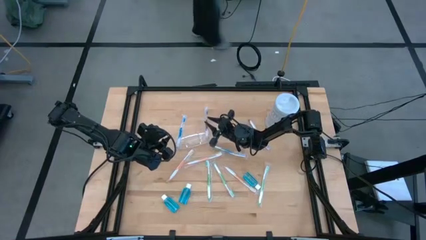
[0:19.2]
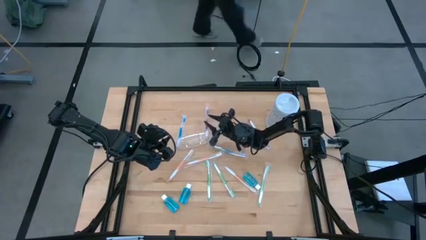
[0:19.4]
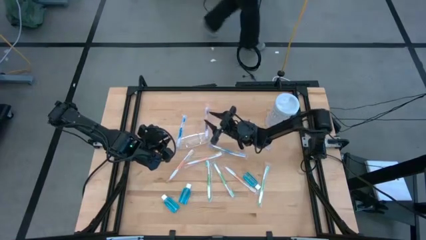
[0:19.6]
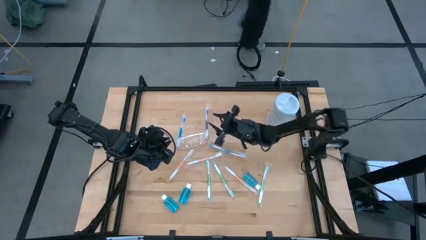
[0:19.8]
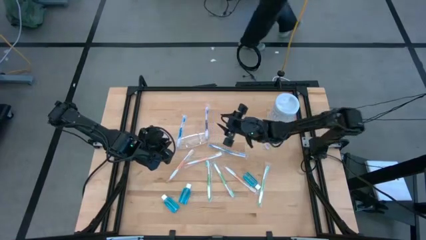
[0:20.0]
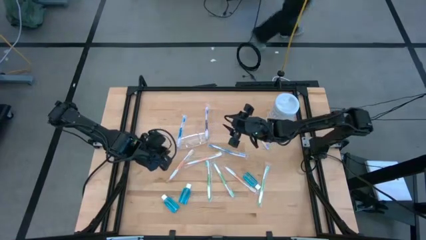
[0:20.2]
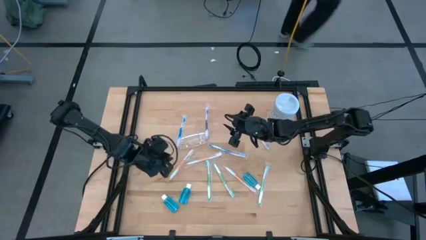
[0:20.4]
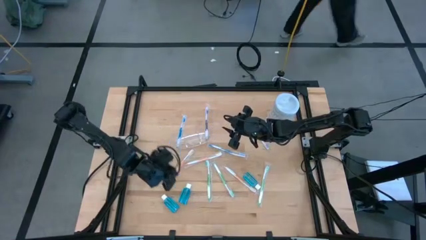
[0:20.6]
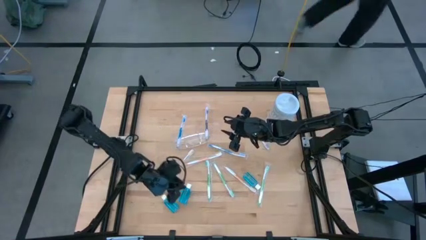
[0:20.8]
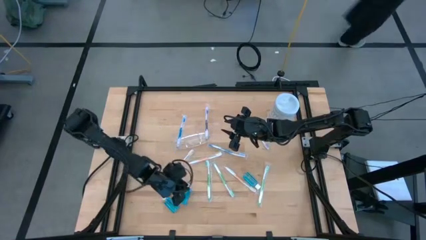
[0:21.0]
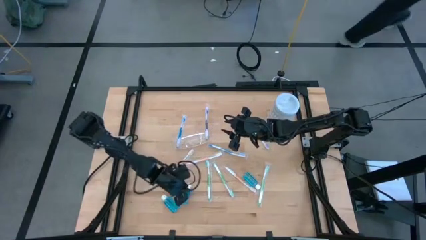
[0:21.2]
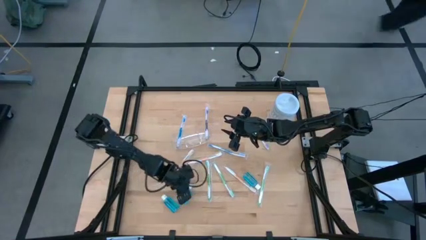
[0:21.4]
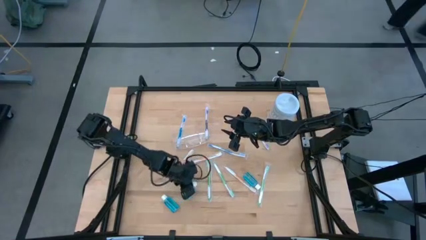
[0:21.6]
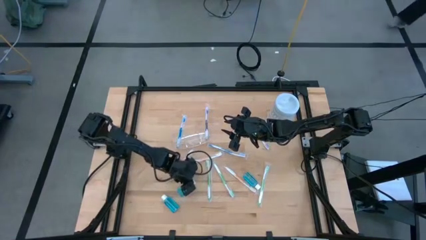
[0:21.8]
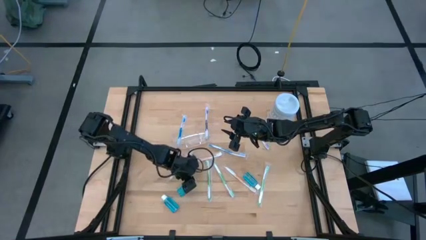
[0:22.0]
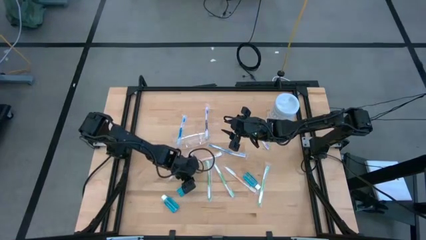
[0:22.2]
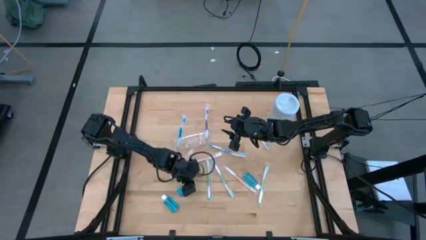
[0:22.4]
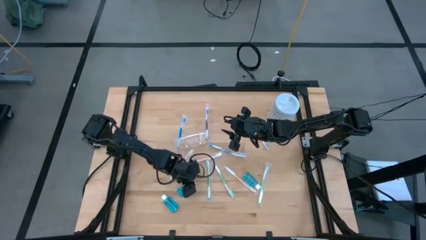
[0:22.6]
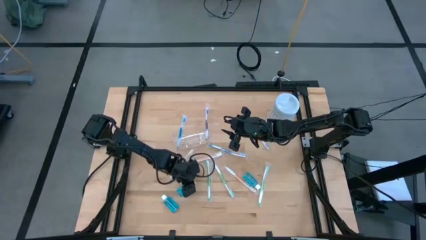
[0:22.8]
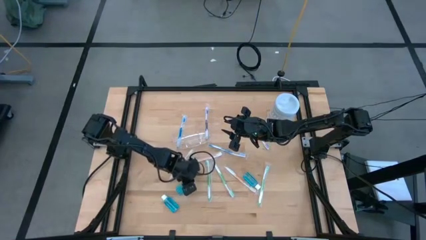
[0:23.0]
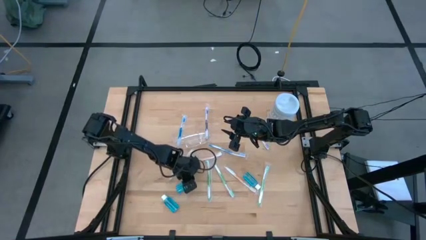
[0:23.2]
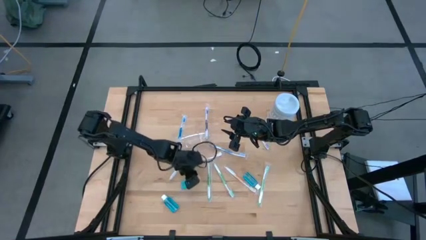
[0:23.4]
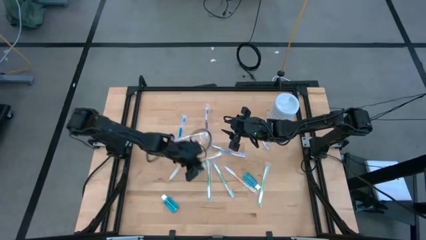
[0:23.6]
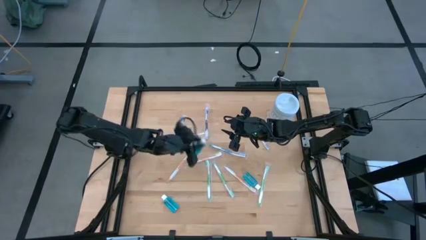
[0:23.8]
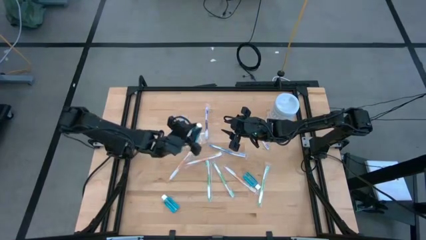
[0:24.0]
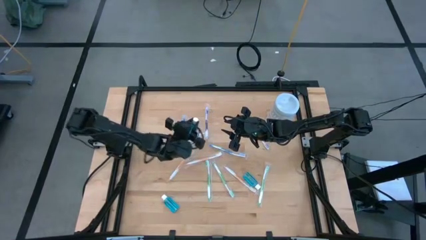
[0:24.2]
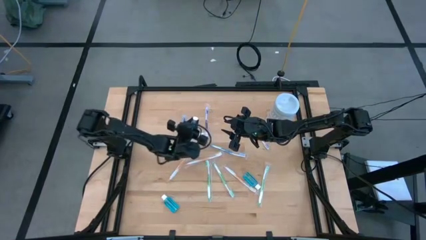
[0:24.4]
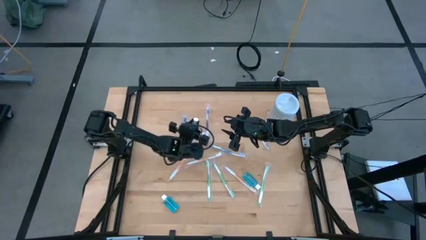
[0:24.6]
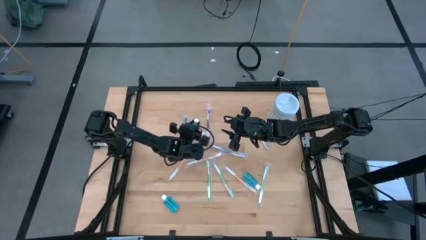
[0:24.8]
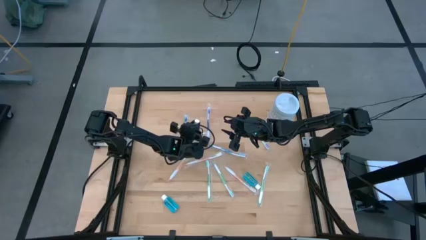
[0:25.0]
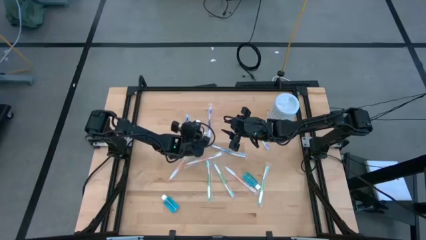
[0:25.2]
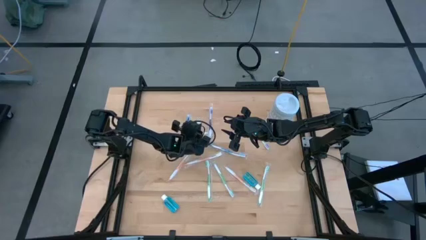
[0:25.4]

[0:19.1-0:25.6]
Task: Pick & Place toothbrushing station
Put the middle blue mouthwash into the transparent organizer

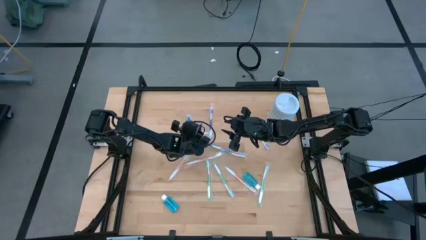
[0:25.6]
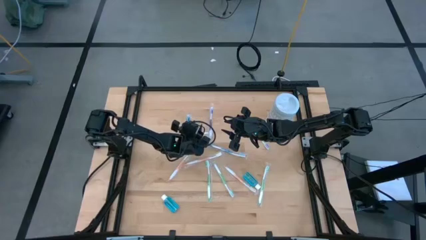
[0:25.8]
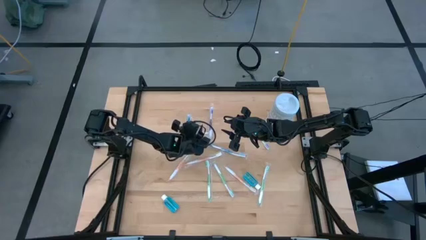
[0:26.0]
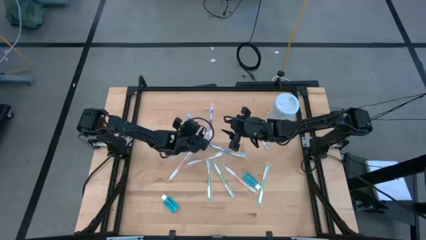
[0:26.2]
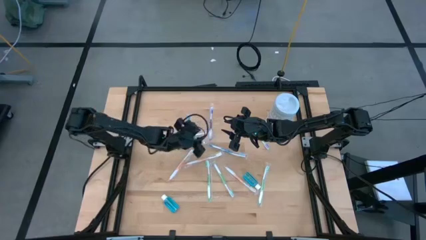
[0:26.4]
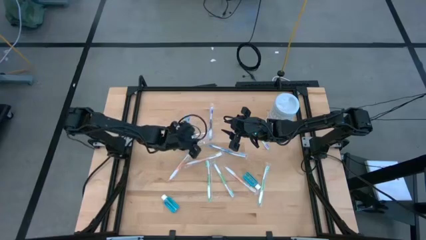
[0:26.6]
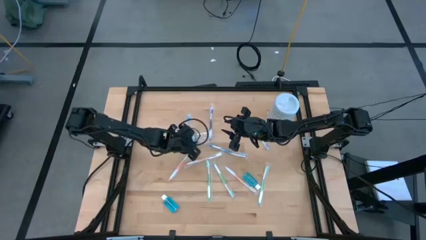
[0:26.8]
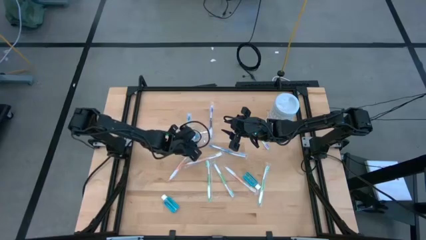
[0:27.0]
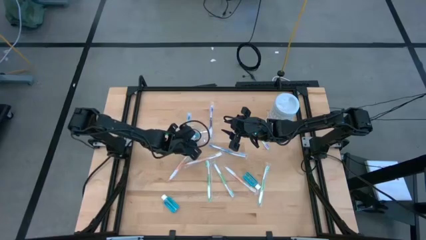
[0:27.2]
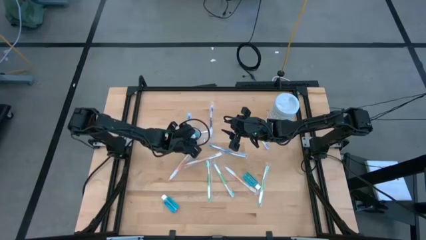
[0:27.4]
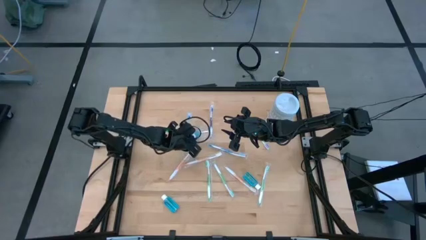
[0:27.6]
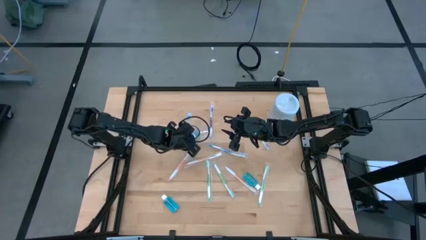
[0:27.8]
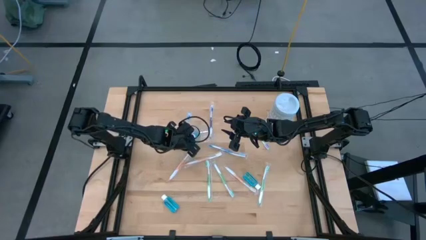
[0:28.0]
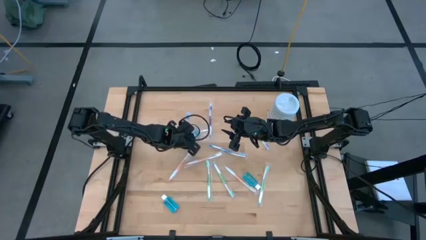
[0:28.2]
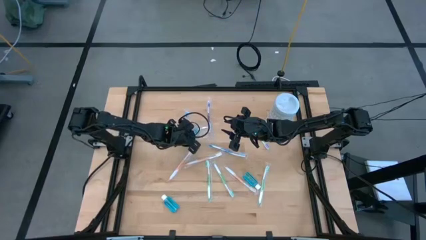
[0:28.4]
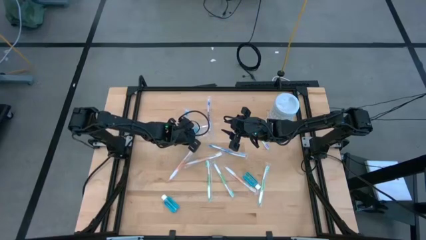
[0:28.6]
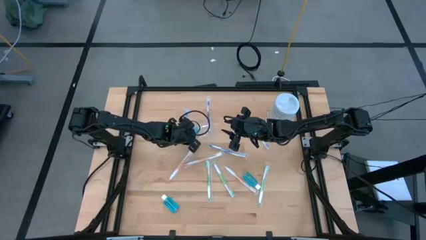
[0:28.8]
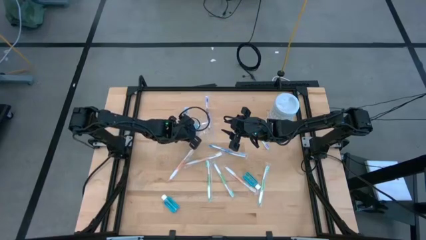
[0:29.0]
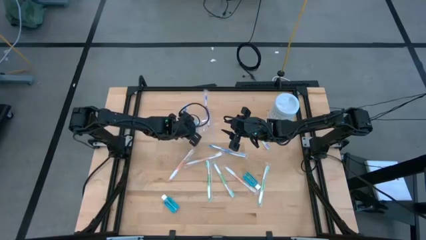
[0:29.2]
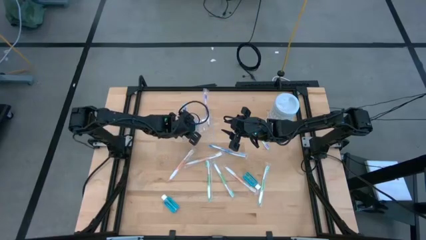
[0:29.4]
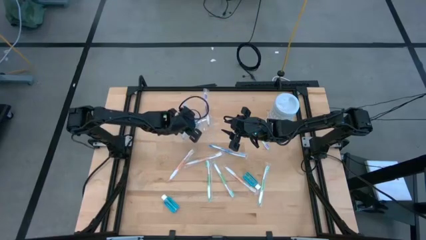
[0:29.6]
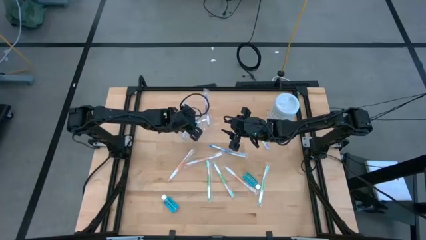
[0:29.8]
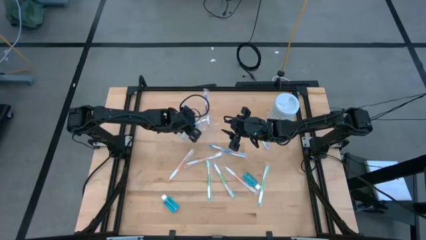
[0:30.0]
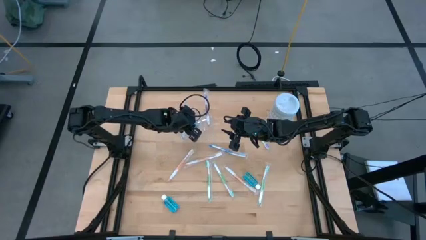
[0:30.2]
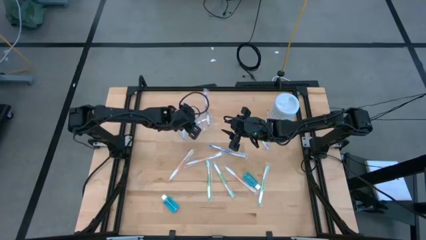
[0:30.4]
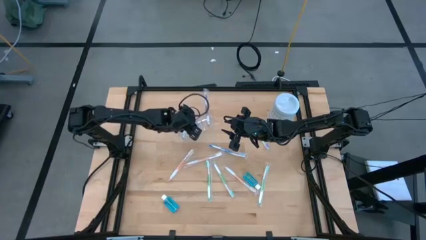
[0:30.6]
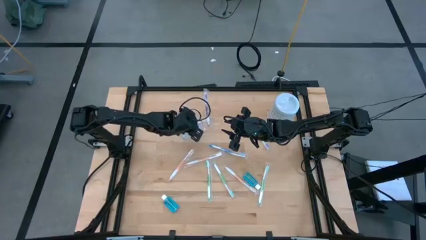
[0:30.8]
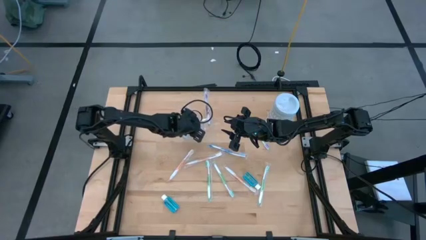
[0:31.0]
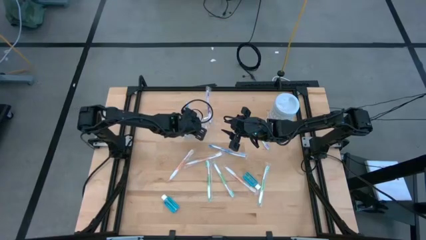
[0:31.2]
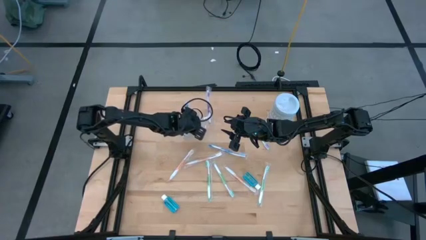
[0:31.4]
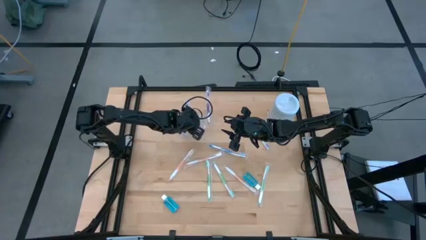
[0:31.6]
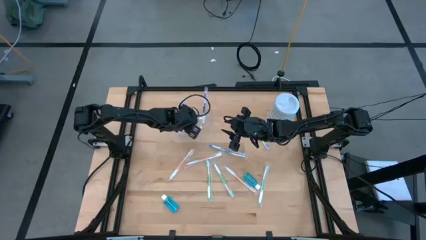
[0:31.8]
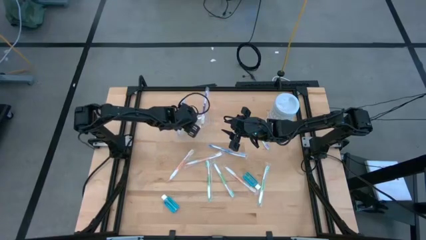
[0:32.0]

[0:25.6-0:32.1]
Adjust the blue mouthwash in the transparent organizer

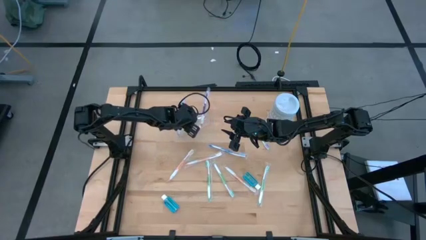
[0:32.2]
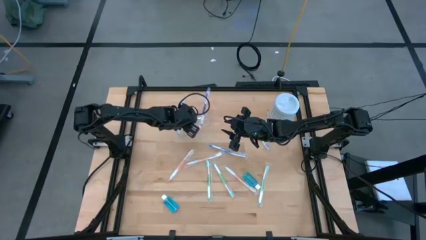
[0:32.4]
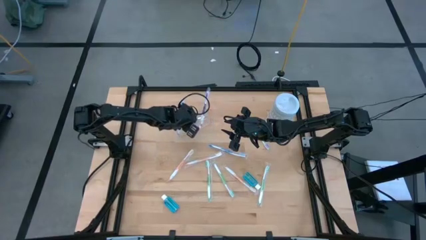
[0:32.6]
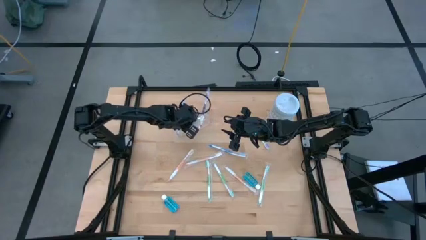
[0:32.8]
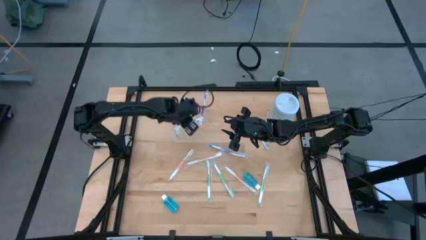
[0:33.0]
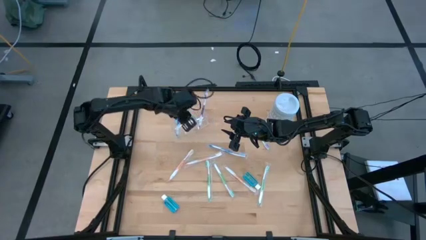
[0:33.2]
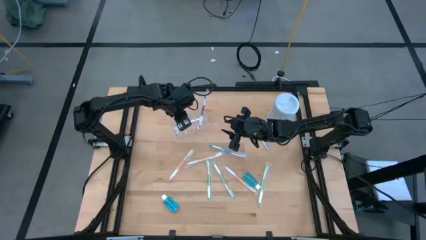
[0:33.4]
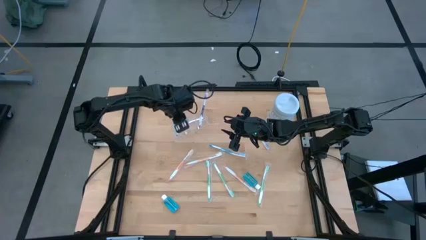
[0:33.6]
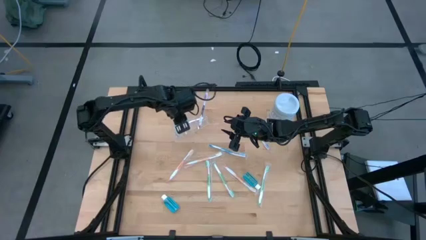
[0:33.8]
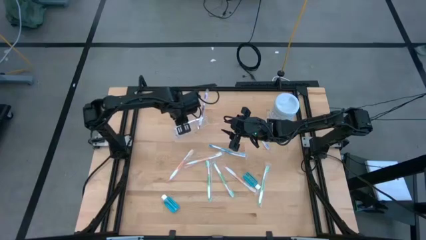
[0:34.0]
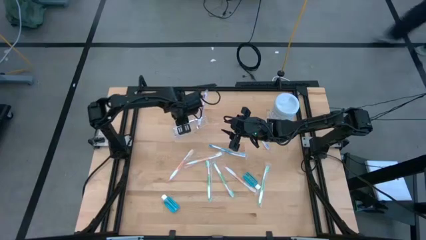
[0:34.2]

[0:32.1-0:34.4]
Adjust the blue mouthwash in the transparent organizer
